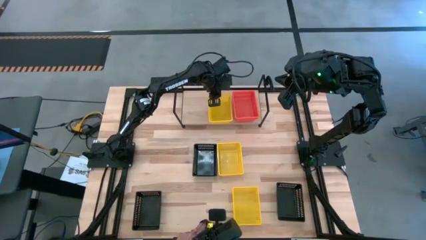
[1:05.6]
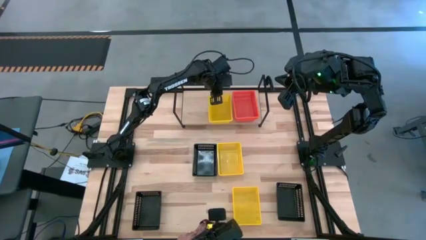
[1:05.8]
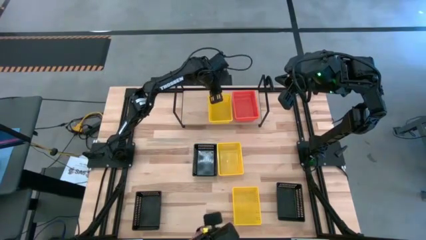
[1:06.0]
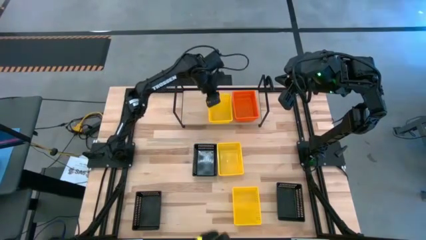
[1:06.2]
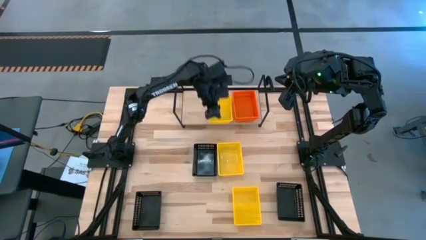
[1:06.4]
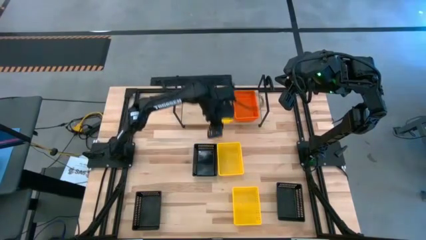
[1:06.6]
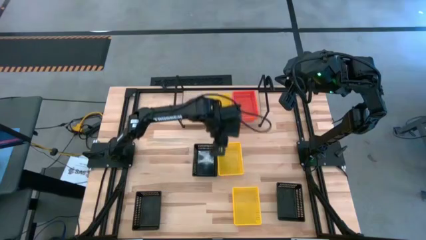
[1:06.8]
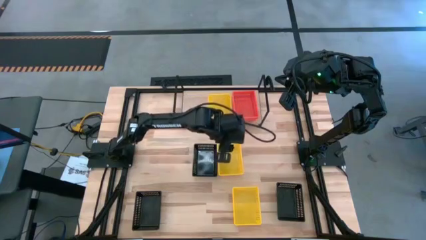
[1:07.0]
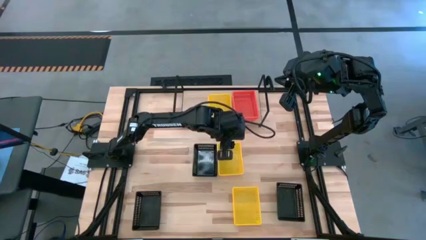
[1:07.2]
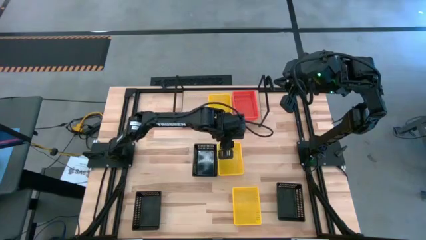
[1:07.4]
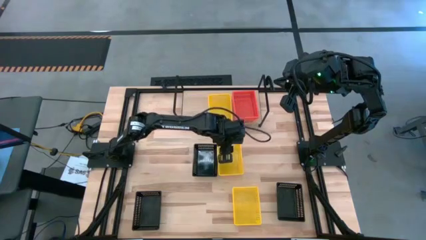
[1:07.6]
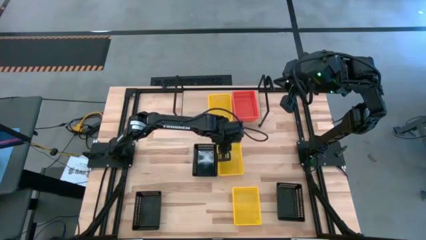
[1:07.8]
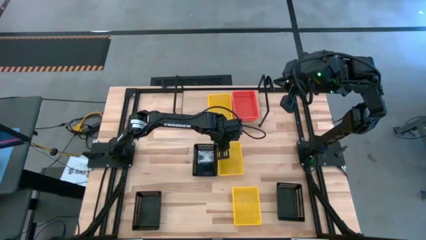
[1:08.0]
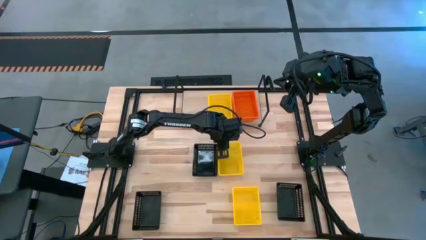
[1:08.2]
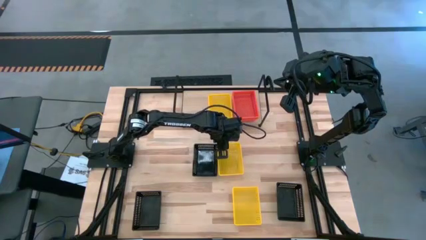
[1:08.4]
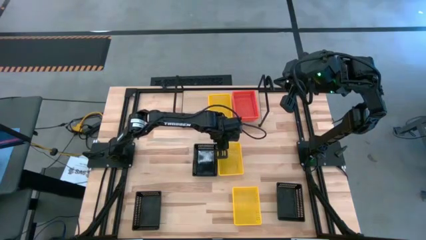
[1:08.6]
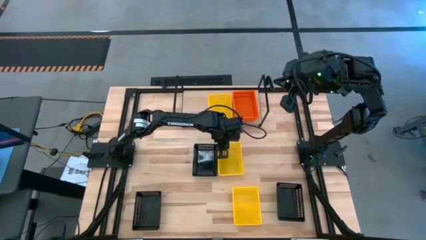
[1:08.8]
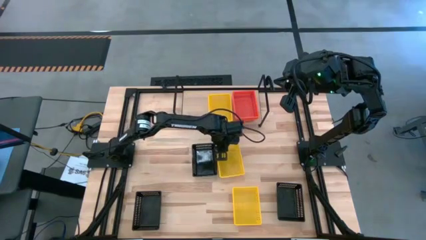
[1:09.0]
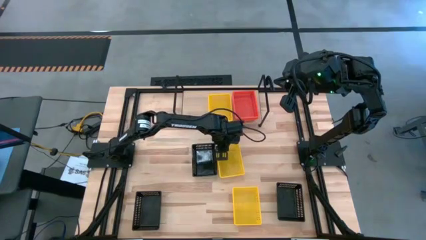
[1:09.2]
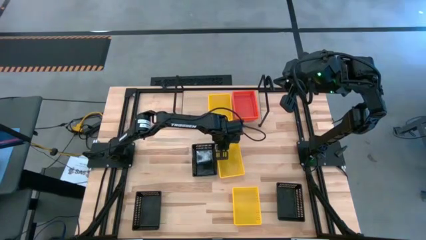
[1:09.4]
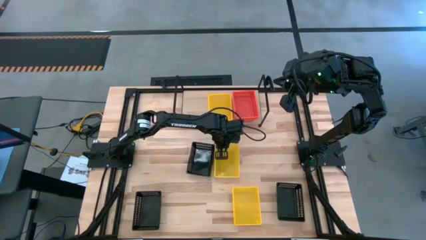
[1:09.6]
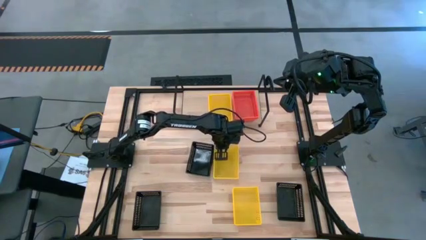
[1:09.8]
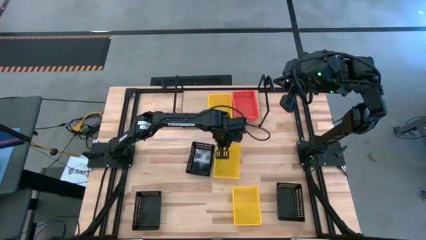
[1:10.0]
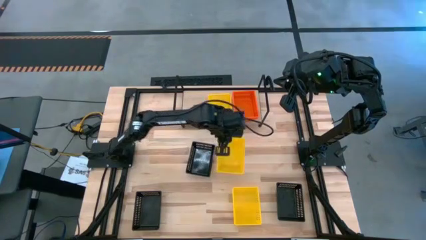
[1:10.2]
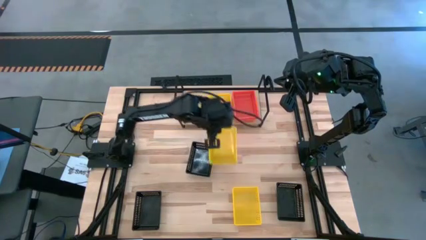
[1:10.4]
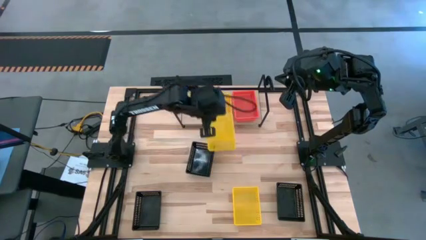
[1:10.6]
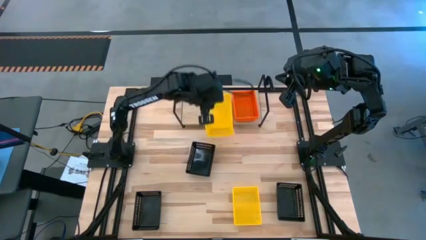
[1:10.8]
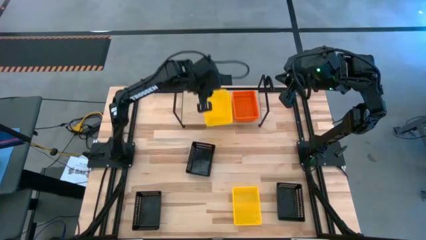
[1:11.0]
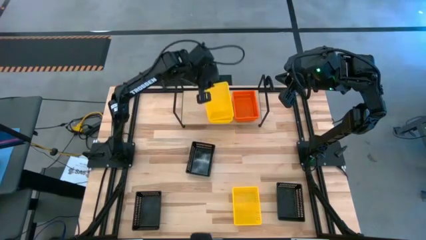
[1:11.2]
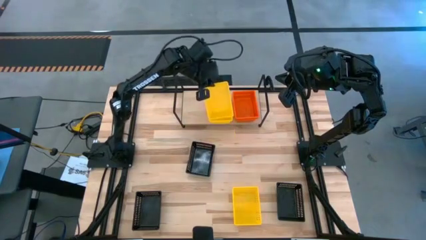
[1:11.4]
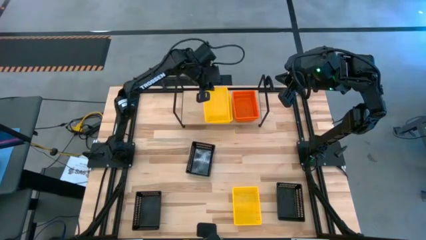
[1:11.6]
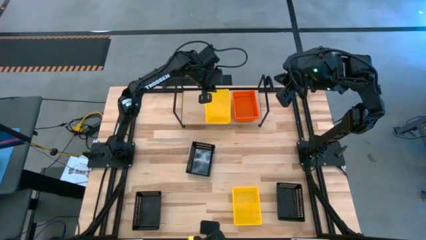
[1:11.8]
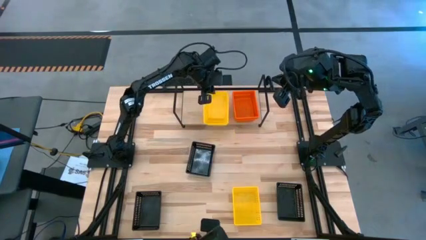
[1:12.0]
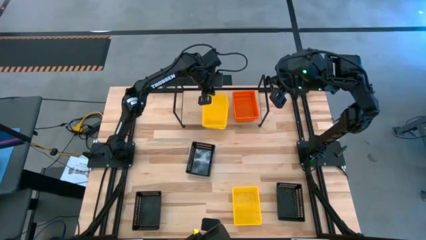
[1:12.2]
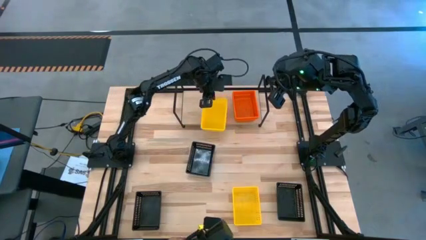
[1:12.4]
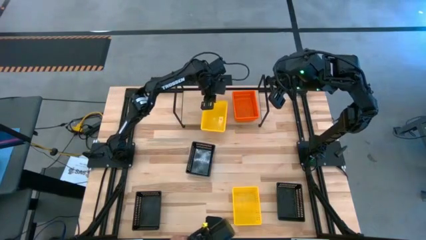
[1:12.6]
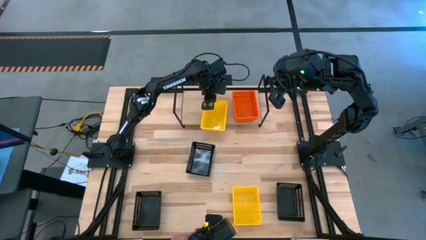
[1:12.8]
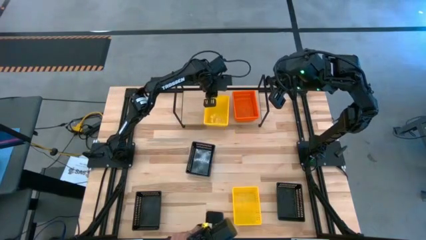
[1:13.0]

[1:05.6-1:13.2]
Task: Stack baskets on shelf by color
Stack the top yellow bin on top of the other yellow bin on the shelf

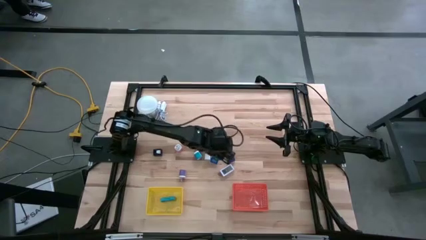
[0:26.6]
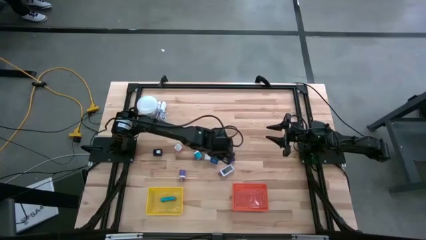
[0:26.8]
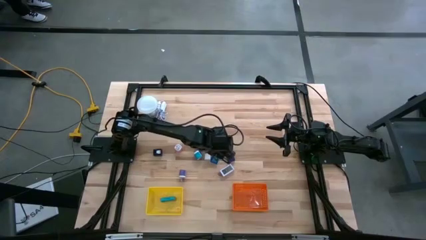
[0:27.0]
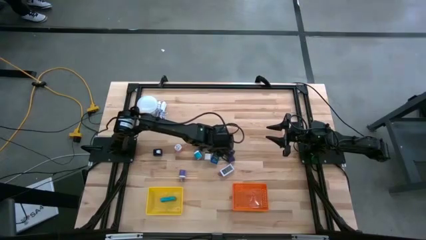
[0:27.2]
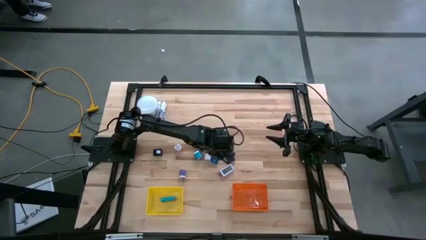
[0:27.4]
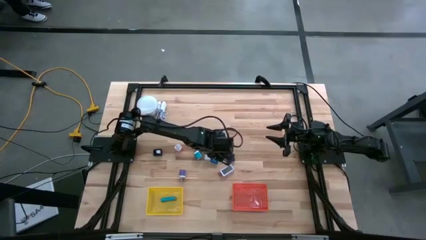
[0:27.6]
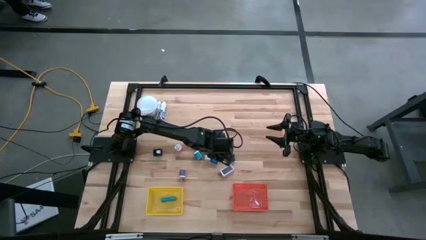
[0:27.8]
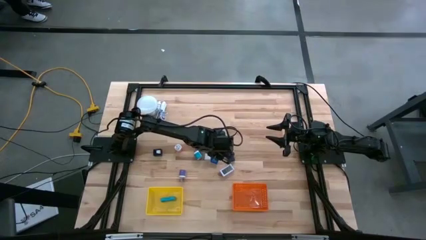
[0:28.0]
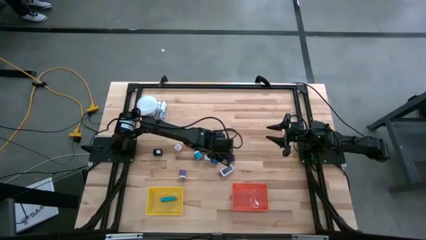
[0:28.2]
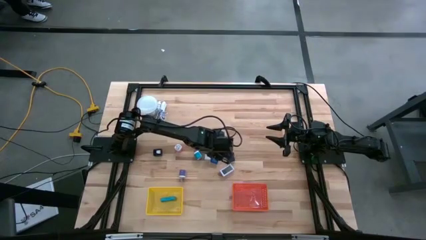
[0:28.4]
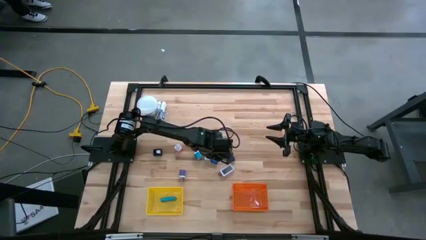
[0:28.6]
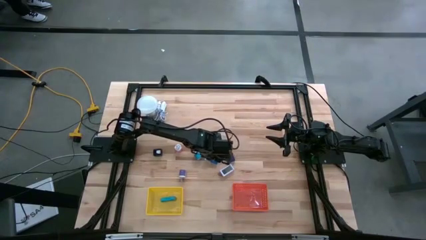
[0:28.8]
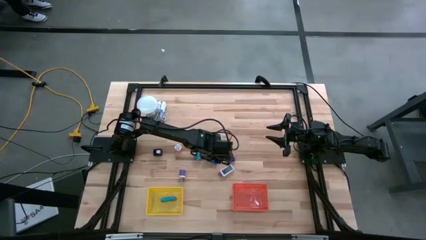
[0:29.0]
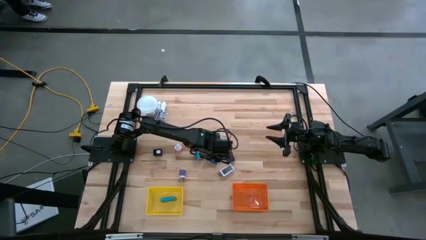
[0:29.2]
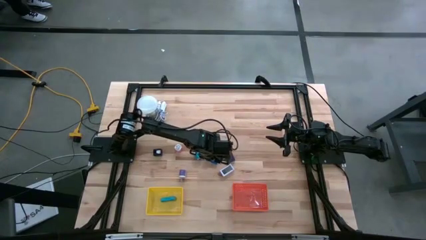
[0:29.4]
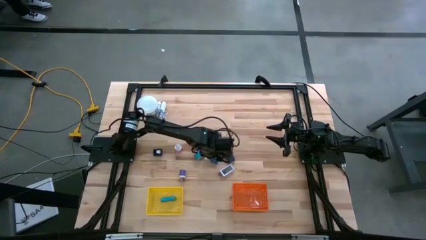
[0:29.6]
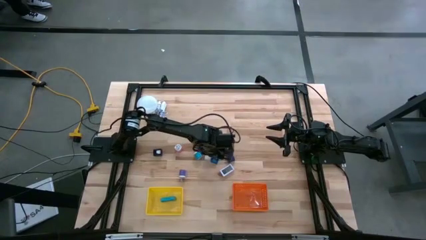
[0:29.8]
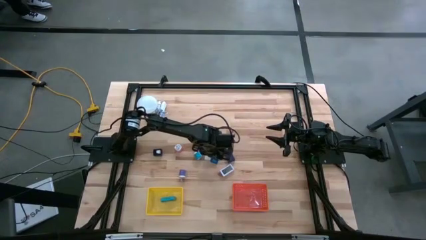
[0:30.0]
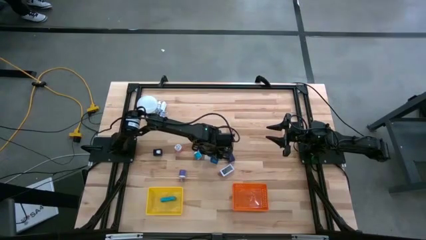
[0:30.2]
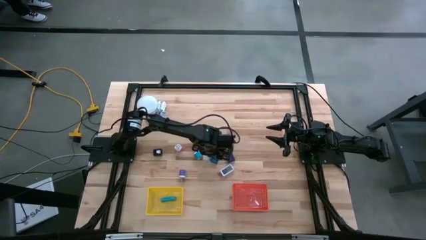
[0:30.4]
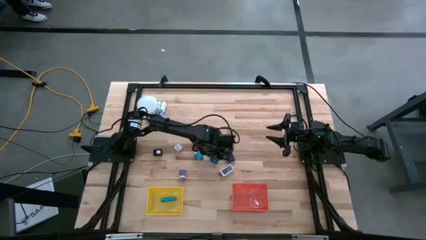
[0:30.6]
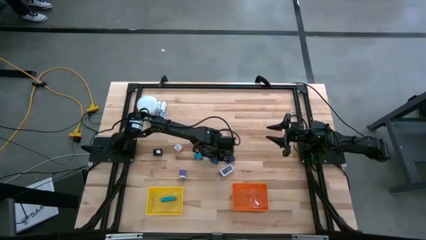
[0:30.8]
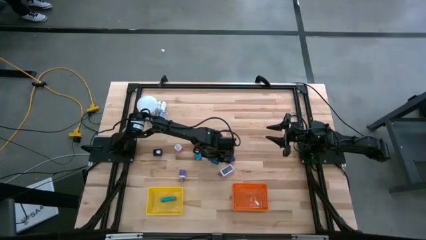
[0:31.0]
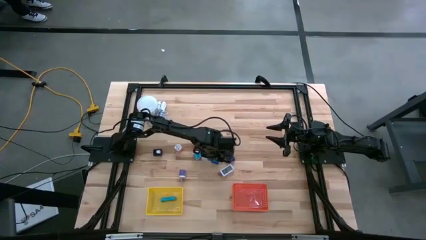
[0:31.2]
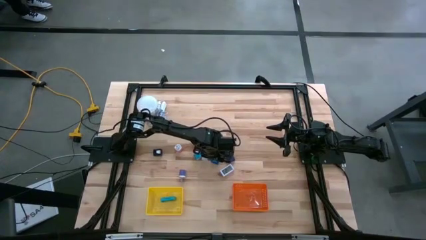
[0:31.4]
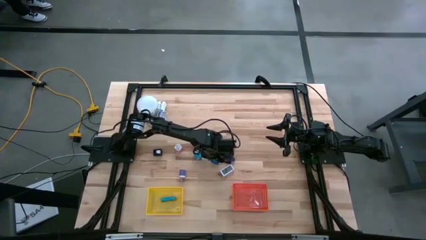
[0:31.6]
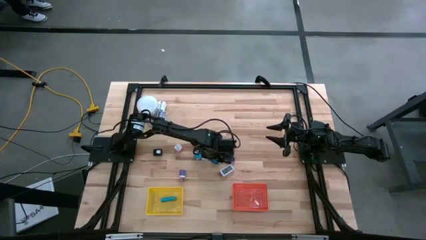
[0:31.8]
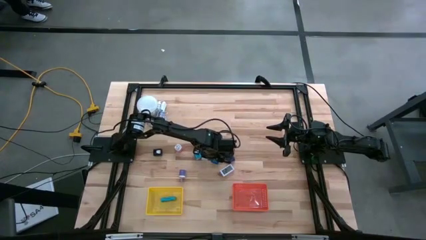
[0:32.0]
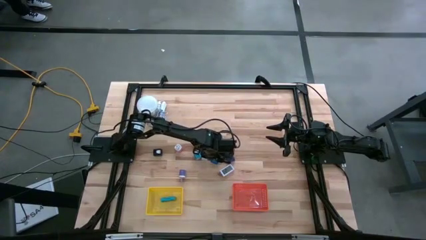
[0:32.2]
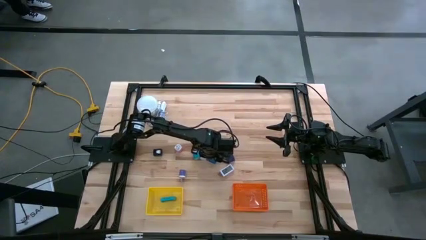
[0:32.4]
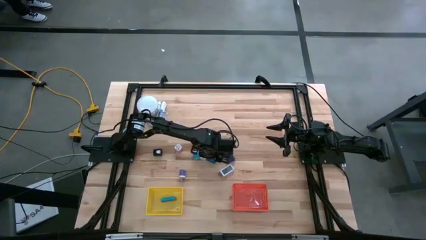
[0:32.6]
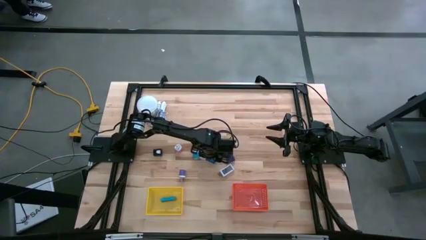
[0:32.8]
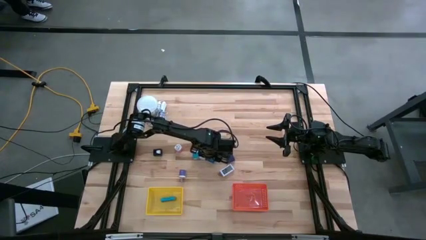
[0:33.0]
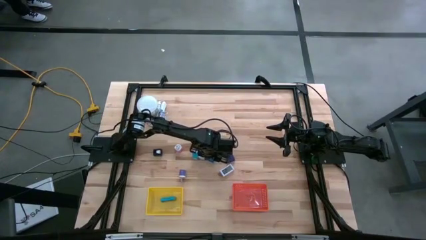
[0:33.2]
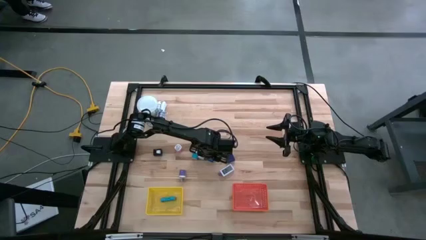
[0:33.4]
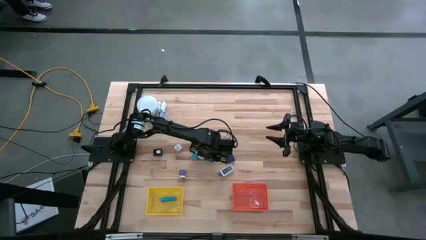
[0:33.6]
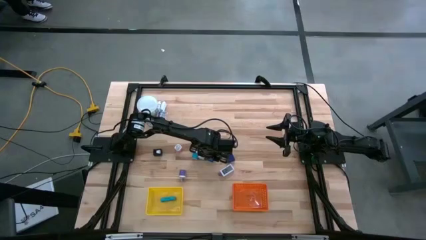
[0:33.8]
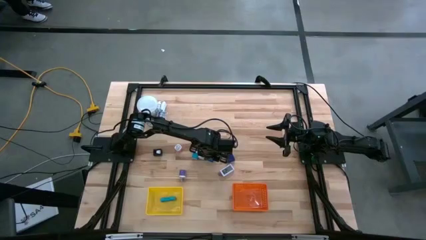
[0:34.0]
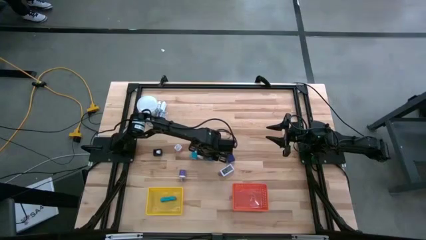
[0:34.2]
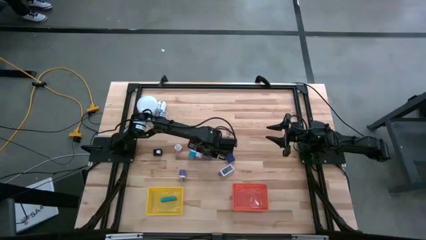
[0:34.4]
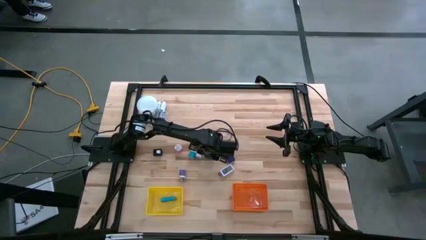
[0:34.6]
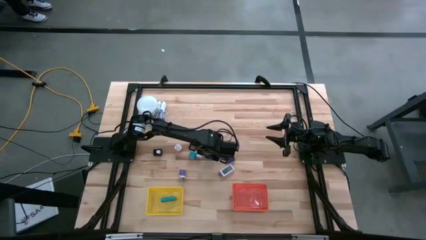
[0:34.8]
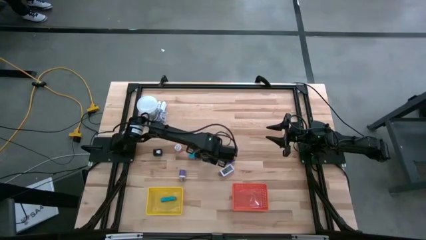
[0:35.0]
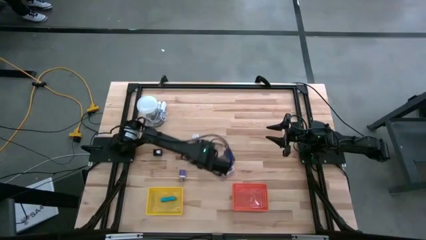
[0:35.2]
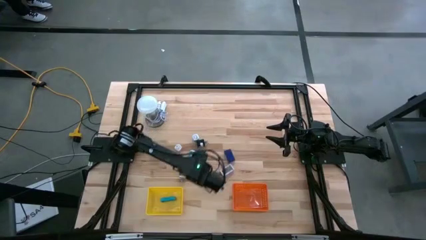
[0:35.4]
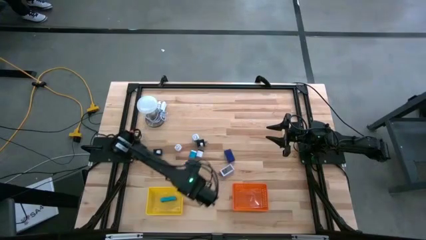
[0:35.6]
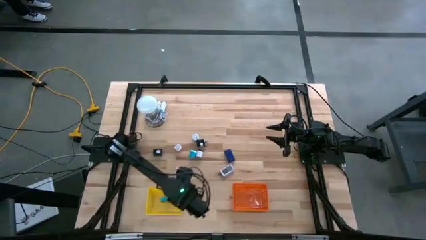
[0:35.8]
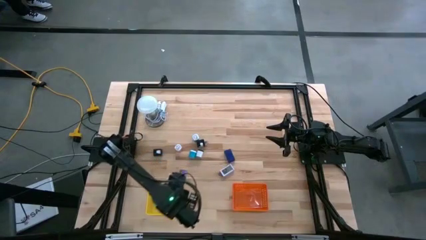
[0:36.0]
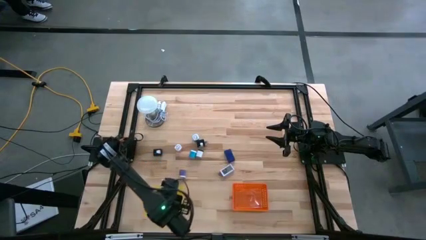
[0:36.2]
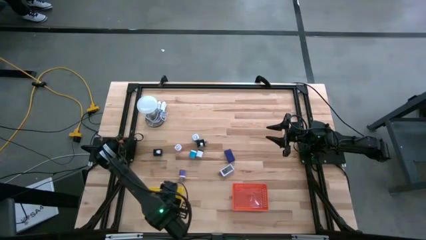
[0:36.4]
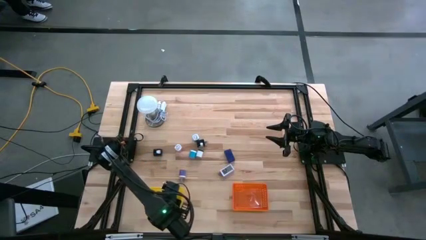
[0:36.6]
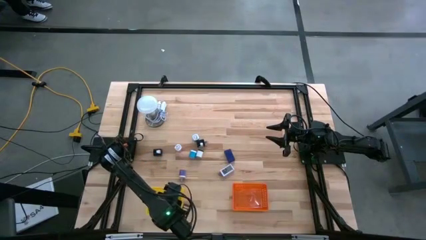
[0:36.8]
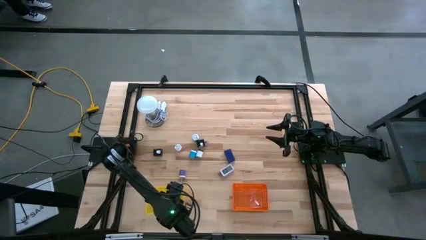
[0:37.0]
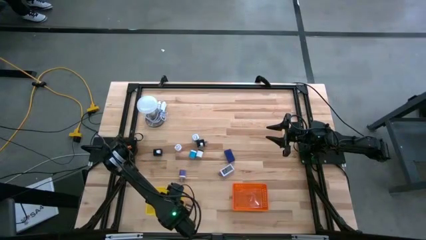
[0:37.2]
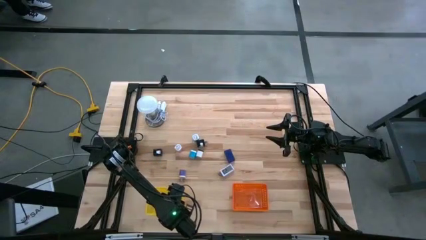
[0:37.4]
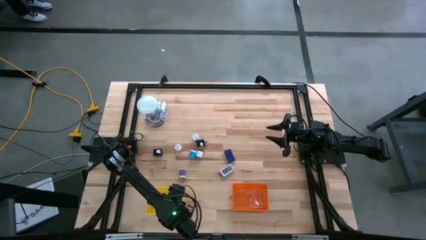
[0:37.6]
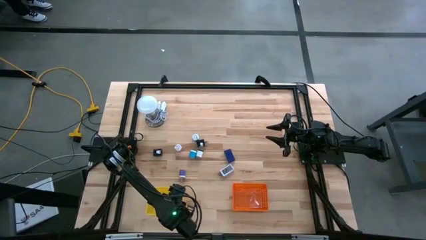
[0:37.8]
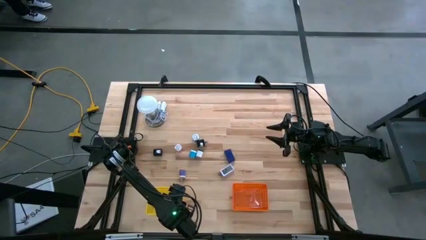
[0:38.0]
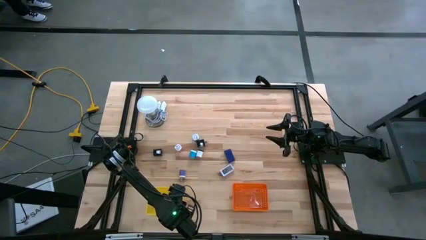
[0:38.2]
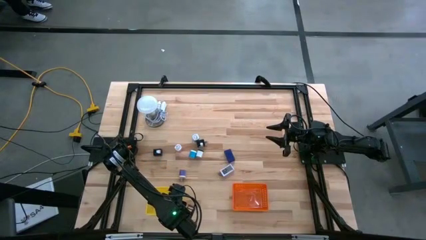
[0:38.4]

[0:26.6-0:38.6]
Task: Pick & Place Office items
Put the blue digital clock into the yellow bin
